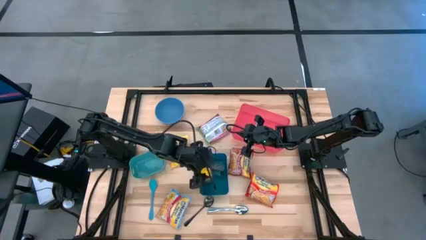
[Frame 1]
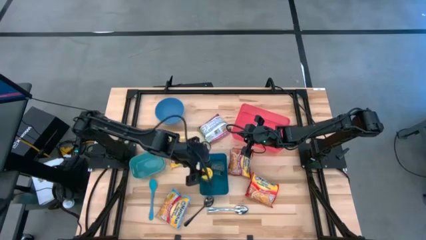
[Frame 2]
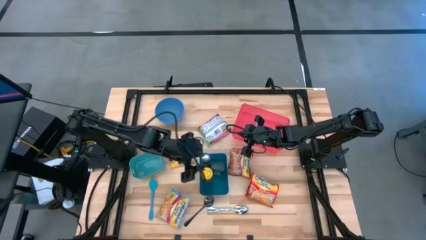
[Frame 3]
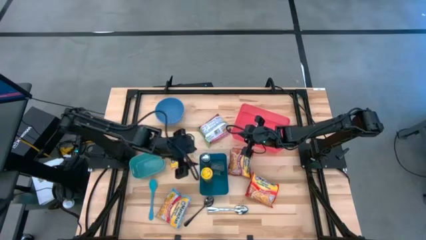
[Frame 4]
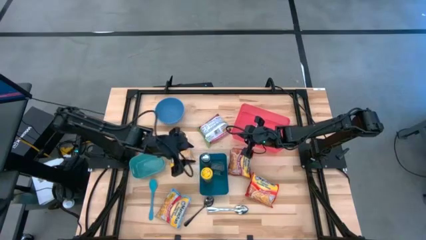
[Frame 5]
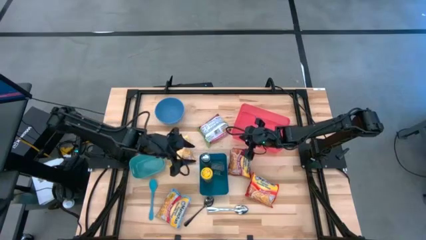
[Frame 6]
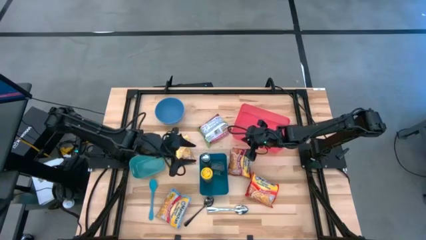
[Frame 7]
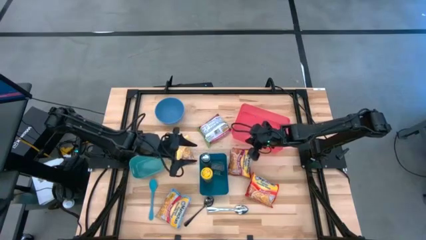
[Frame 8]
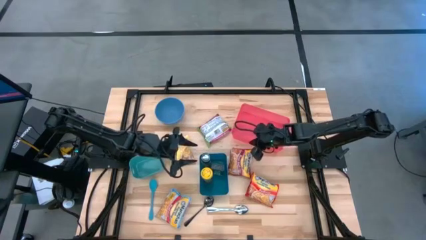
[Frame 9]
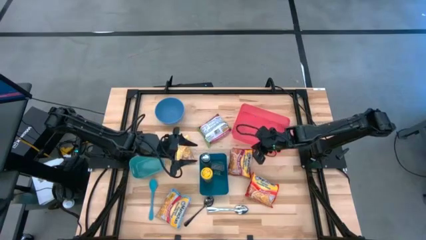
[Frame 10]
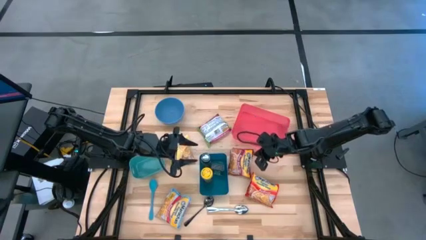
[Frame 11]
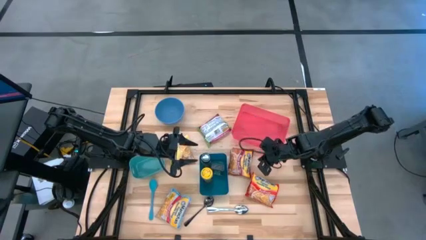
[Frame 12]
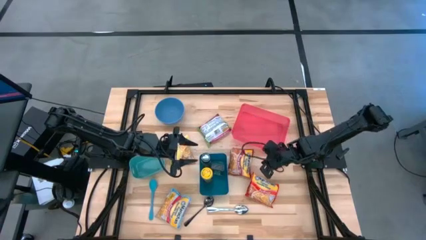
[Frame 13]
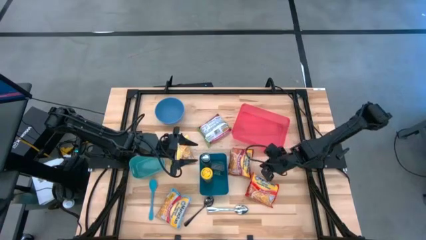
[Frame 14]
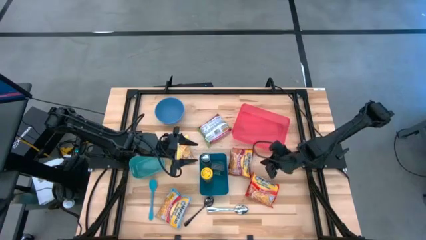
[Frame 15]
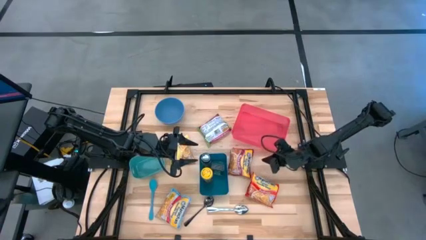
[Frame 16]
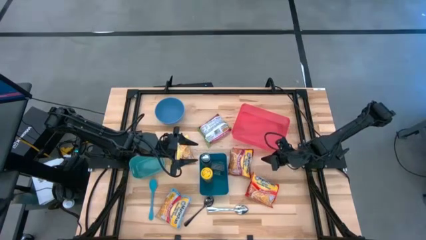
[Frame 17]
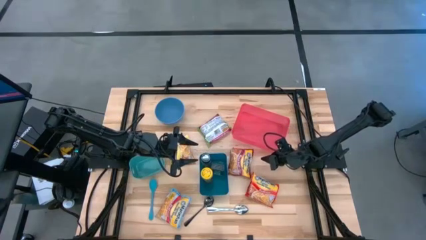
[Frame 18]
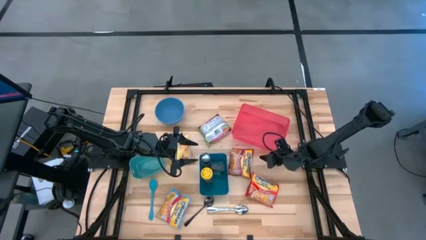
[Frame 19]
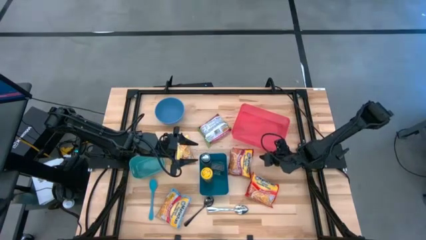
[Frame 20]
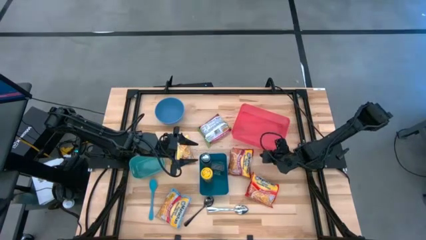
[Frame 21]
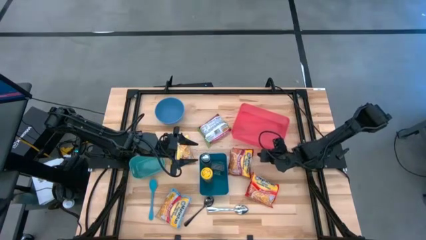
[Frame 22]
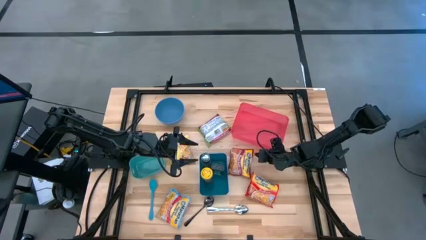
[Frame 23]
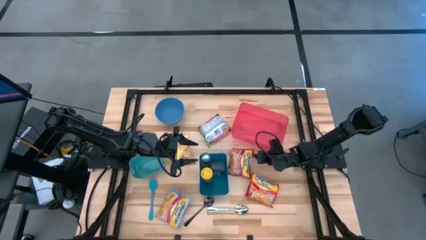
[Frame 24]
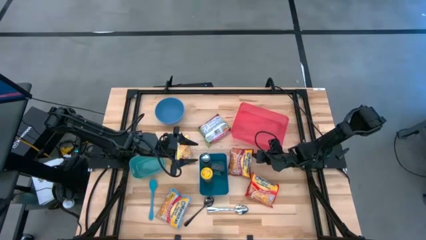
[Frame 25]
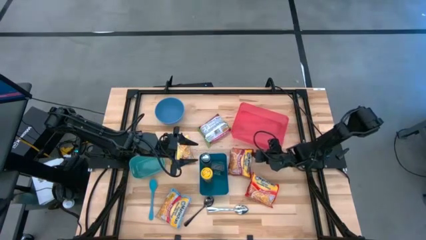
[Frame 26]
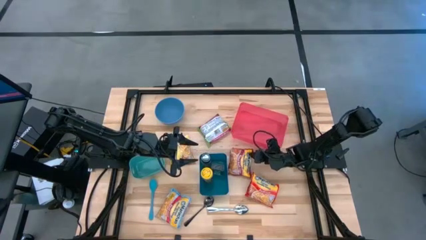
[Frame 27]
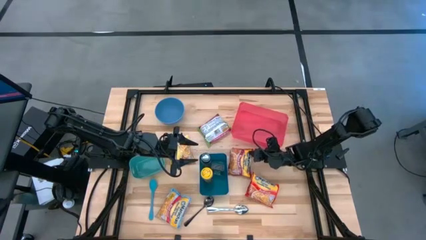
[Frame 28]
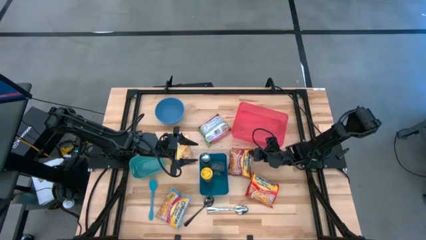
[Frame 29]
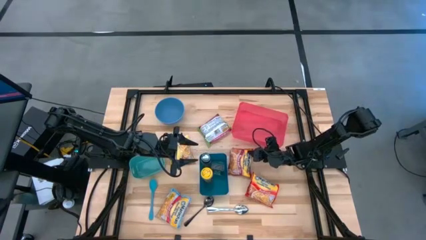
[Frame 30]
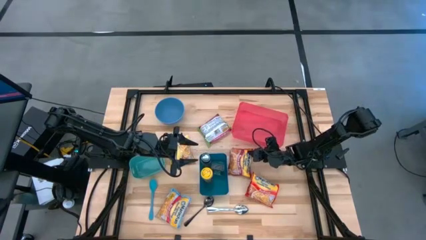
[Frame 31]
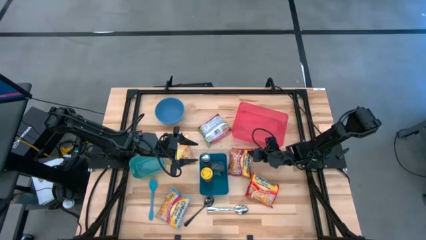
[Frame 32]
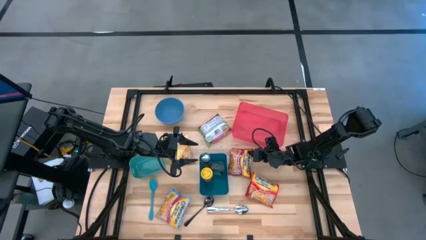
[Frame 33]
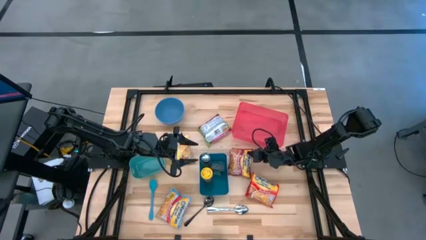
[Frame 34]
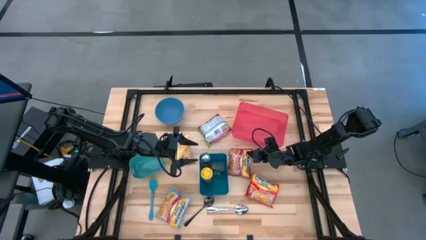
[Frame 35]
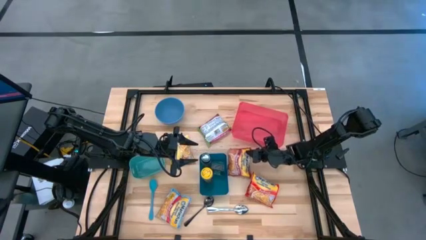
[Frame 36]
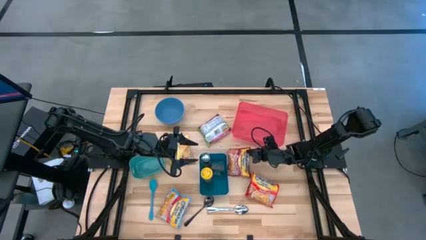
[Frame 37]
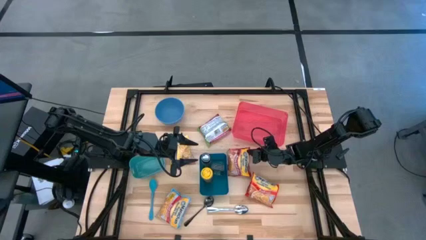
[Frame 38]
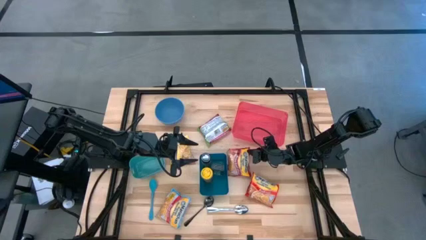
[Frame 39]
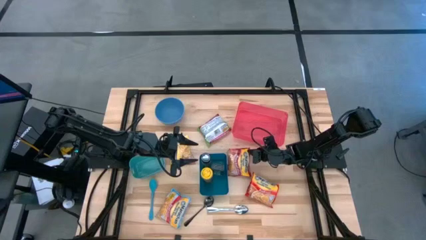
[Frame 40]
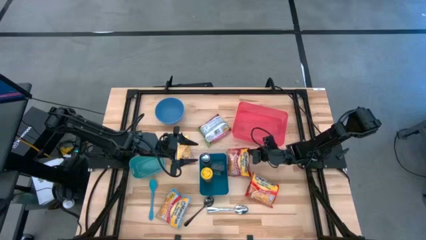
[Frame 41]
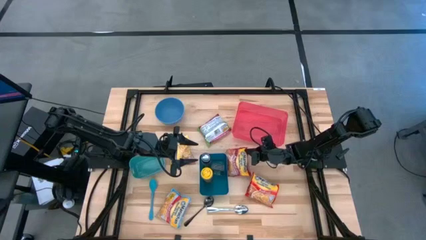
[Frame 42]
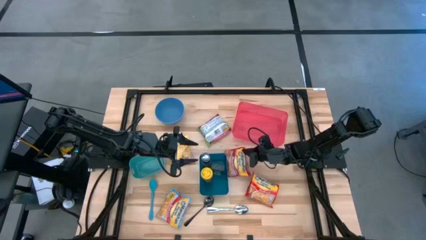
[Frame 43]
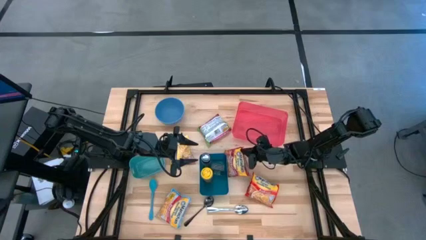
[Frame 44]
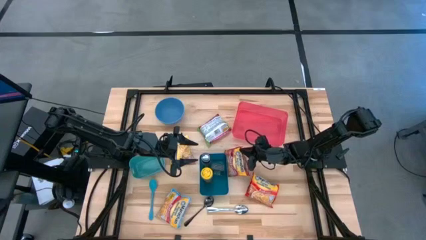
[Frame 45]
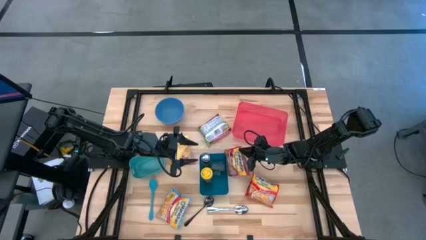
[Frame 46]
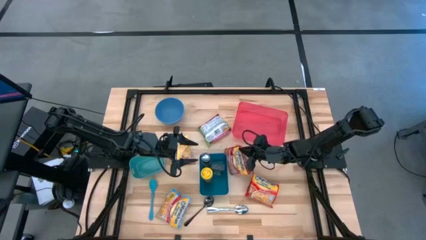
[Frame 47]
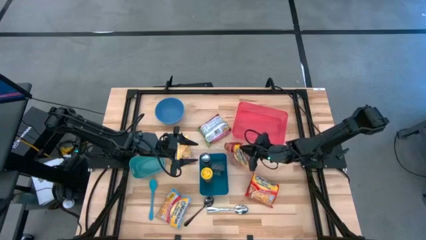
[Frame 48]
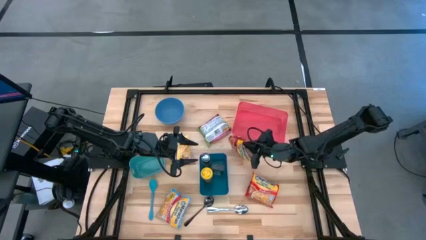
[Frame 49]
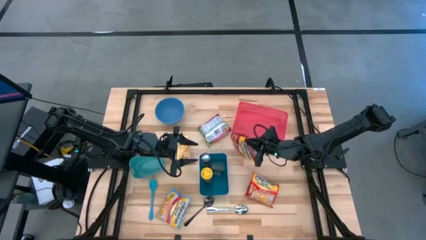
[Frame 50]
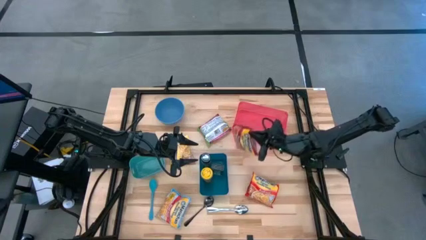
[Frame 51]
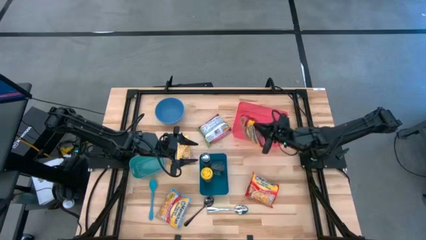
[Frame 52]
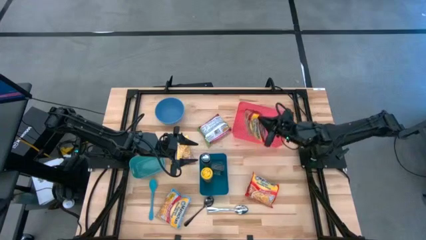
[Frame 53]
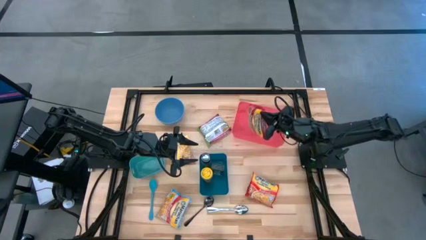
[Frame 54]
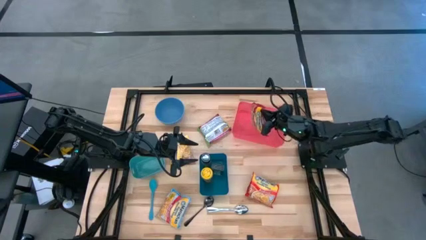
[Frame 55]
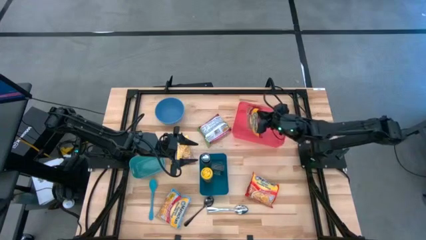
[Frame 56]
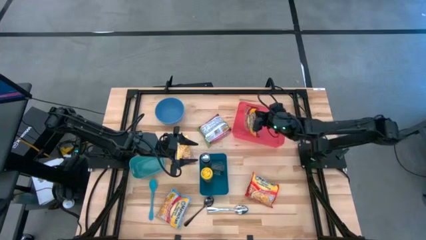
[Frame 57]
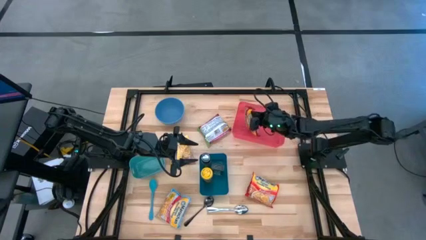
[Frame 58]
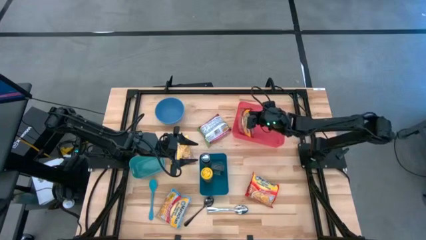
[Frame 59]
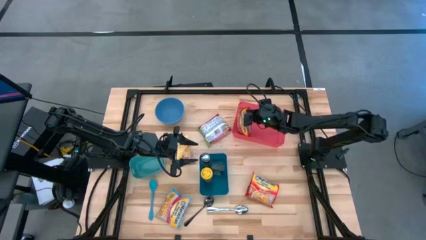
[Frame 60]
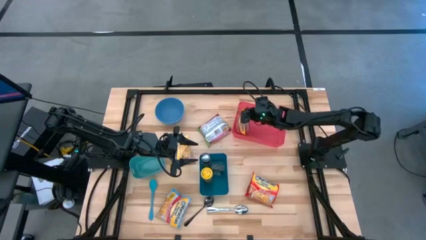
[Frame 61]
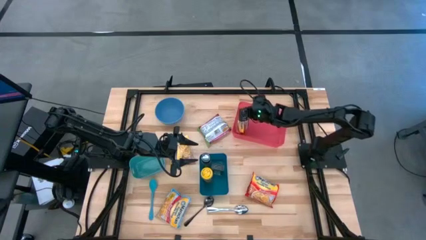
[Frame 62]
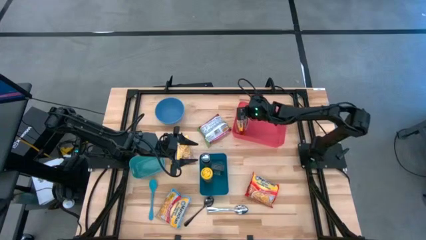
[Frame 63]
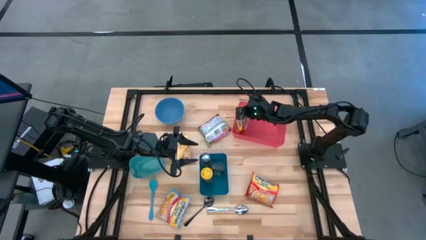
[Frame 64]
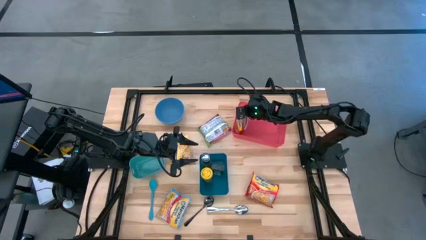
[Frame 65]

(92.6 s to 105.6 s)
Task: Pick & Place Food Item
Put the red noodle pack into the red bin

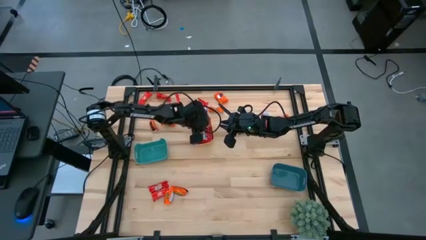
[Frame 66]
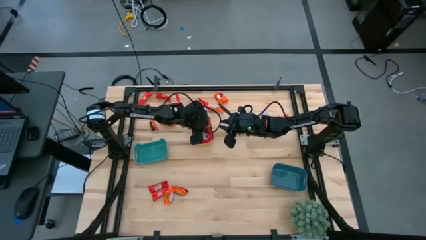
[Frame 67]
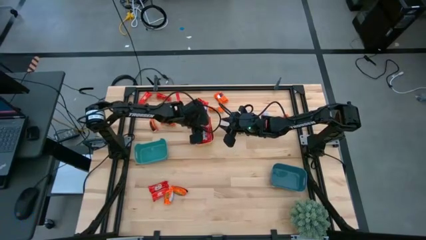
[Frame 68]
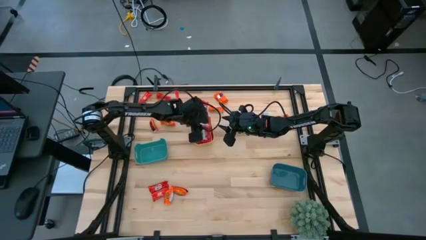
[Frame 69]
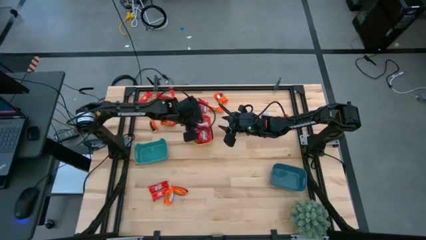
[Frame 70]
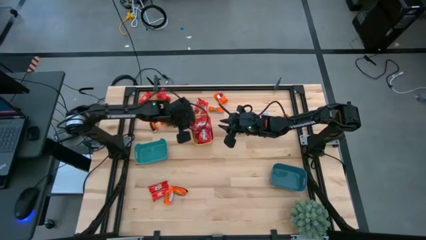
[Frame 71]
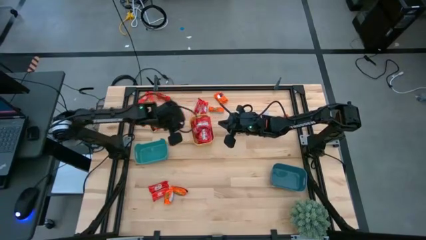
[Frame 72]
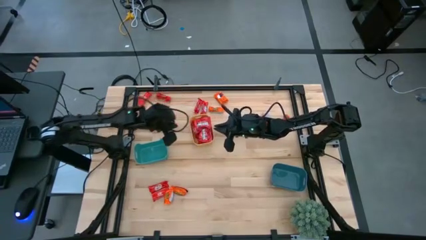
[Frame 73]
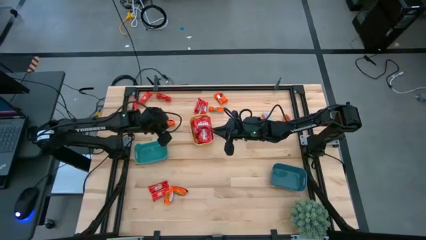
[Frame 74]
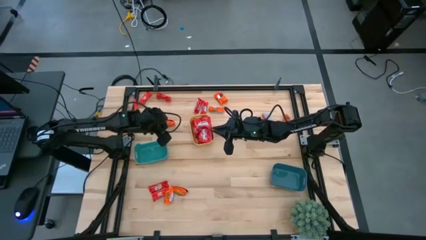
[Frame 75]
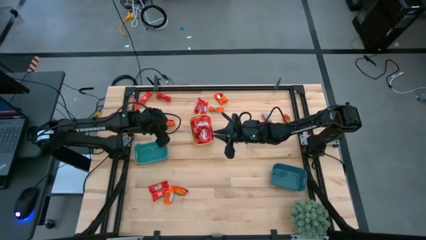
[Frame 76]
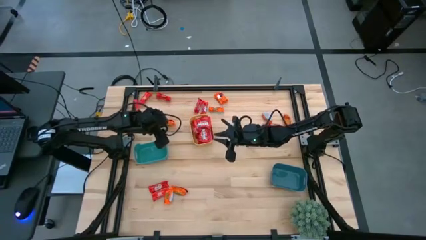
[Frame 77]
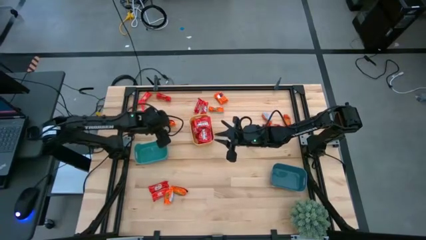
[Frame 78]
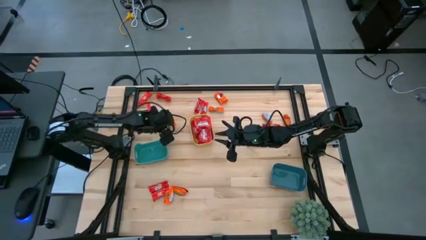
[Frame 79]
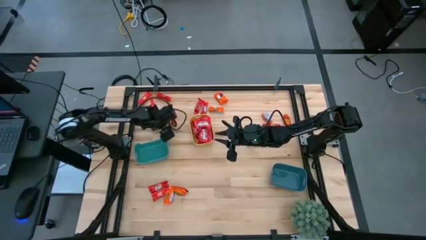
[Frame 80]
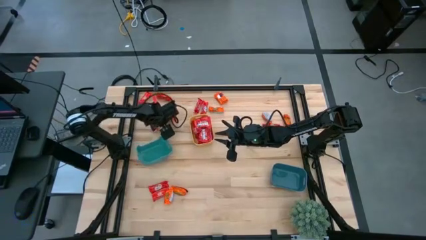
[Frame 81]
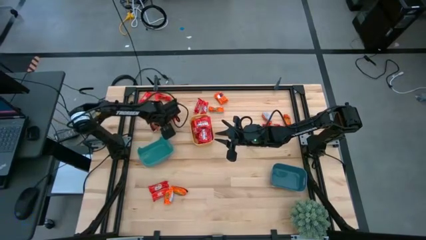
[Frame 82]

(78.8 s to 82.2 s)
Task: Sort candy
Put the orange candy into the green bin
